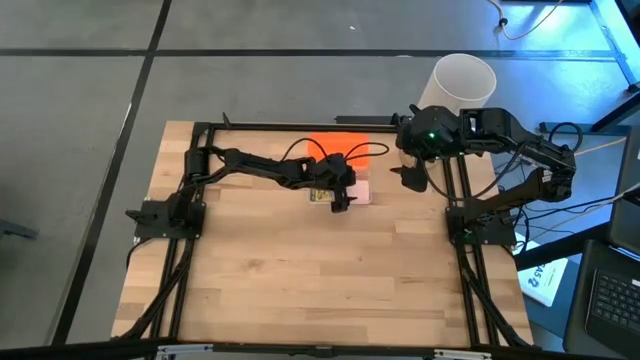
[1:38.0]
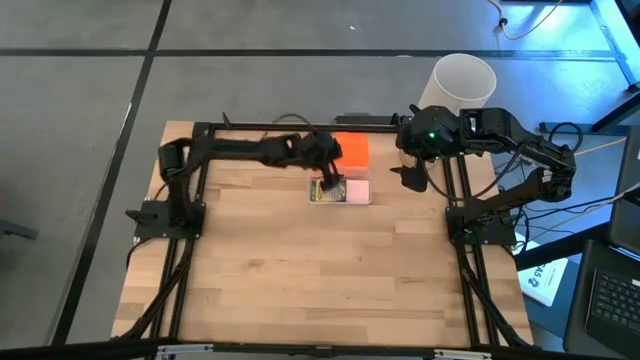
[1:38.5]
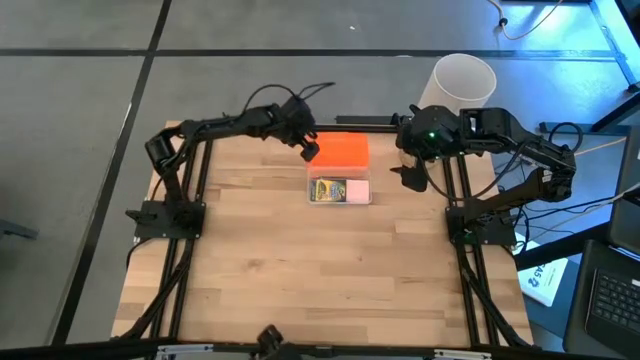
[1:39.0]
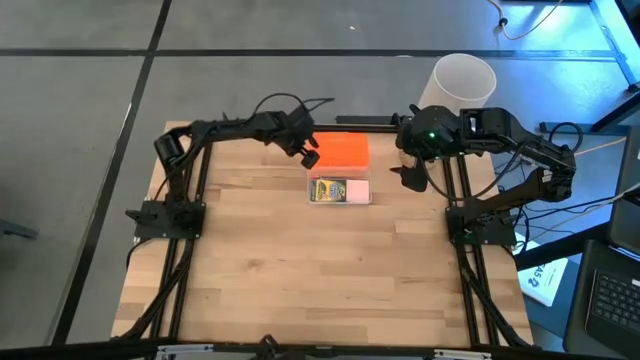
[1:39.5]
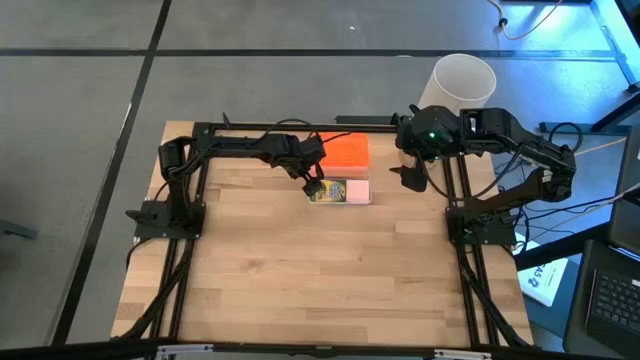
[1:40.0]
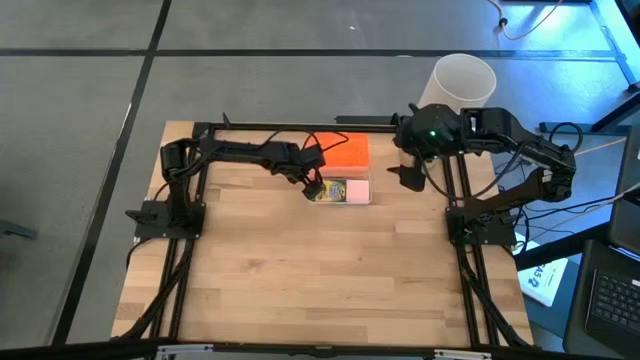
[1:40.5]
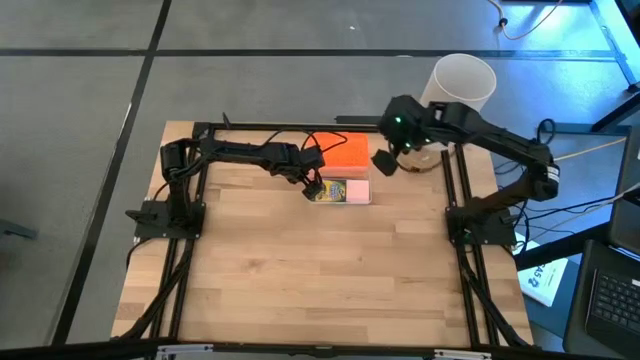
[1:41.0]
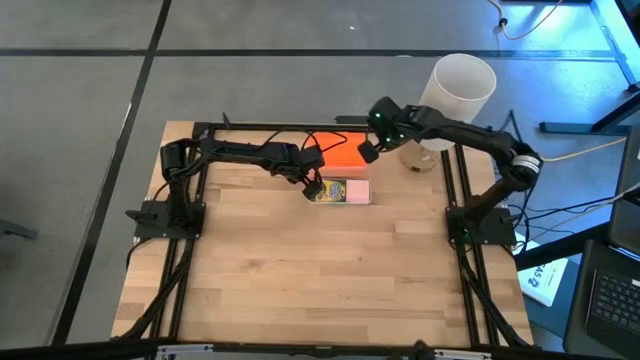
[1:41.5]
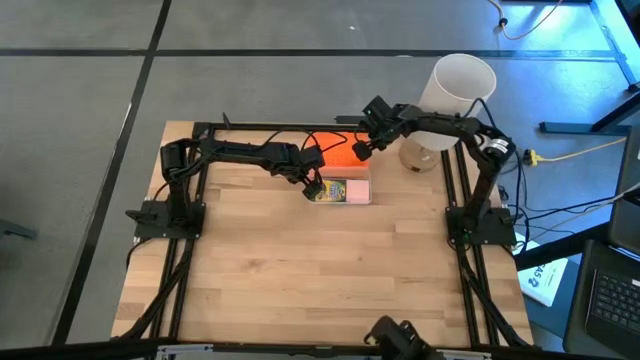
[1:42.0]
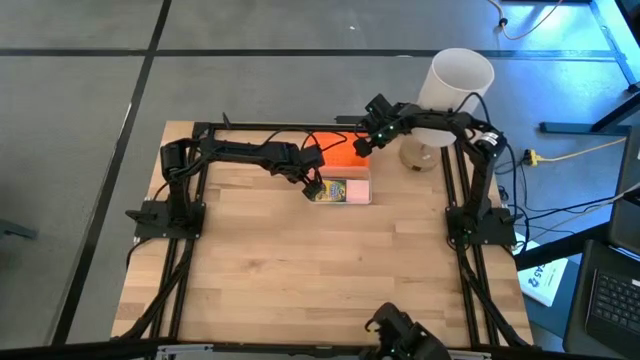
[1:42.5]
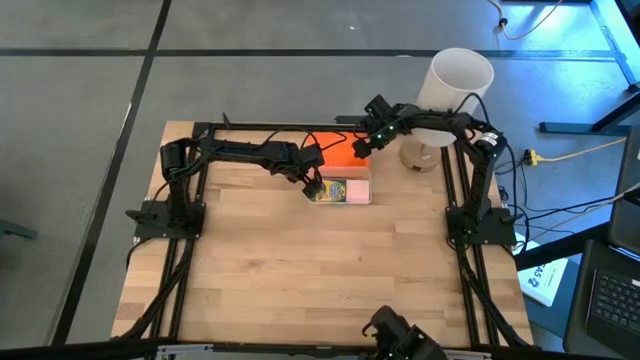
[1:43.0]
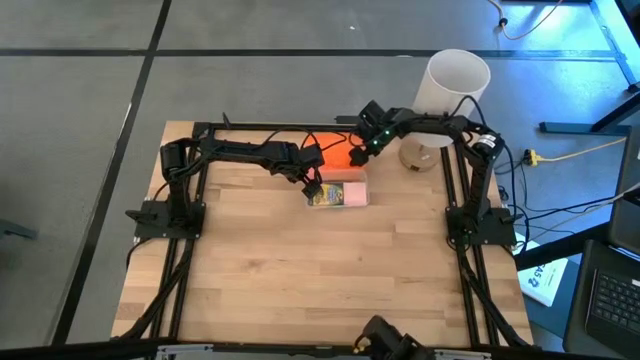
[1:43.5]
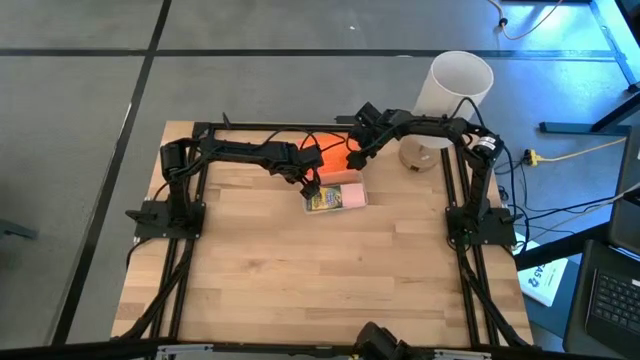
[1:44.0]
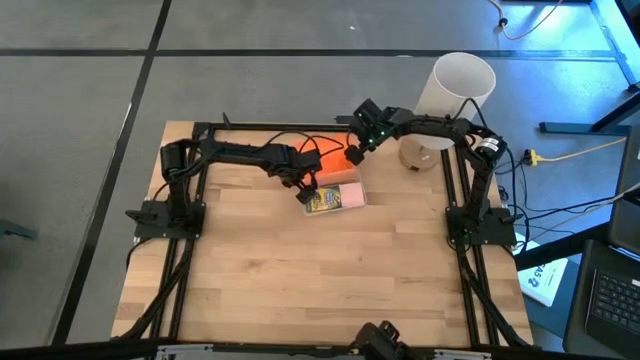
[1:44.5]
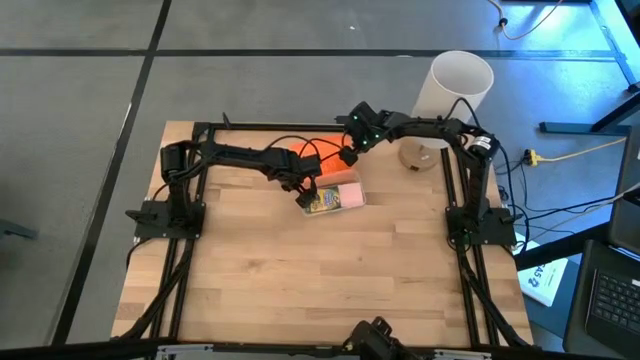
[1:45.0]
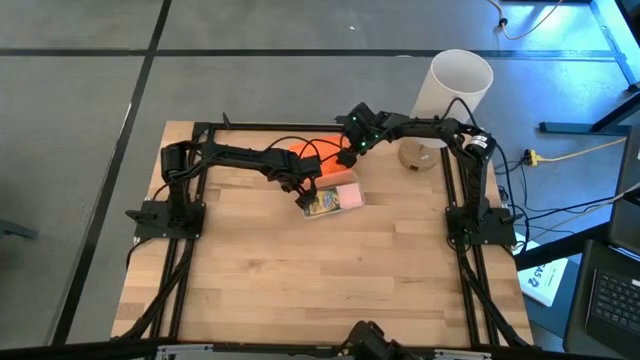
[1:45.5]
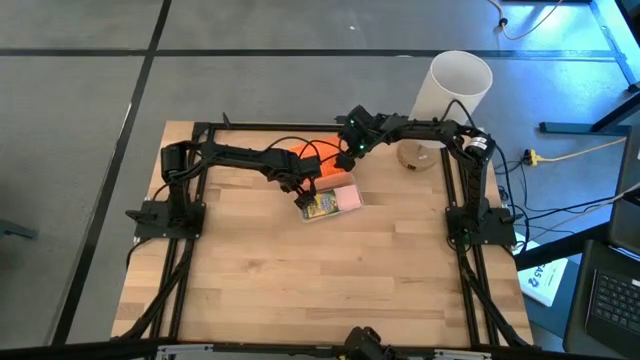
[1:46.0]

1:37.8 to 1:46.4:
Task: Pack school essentials
Close the orange supply box

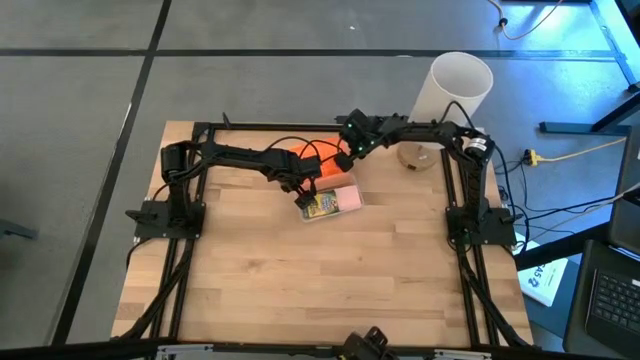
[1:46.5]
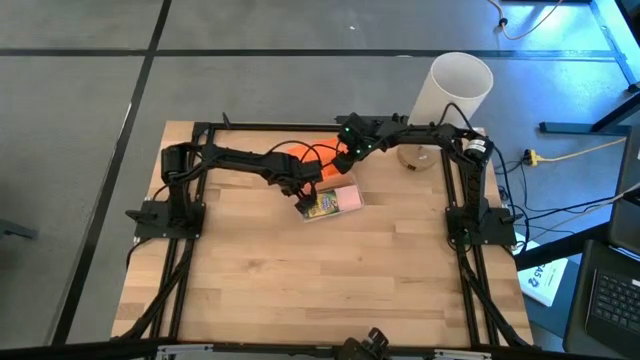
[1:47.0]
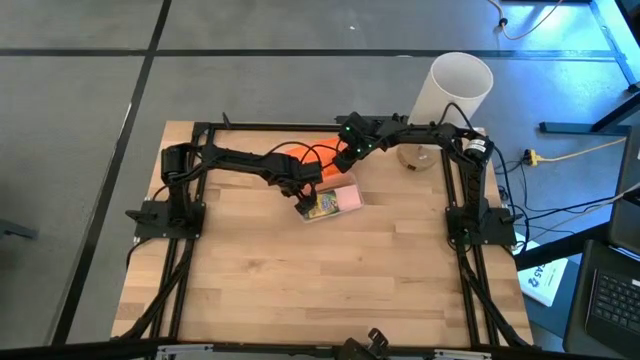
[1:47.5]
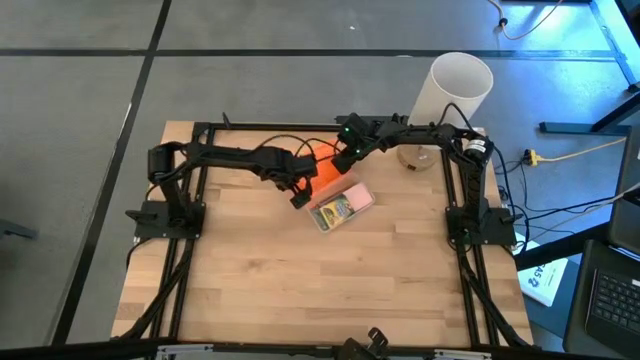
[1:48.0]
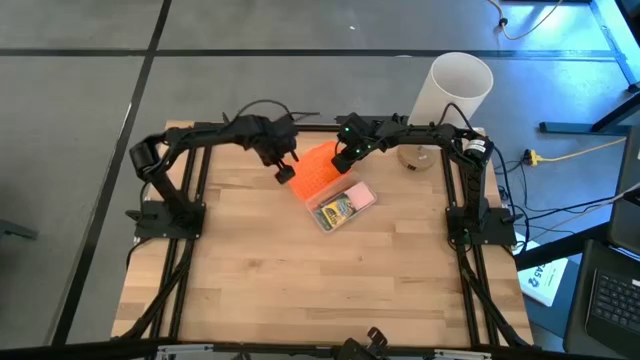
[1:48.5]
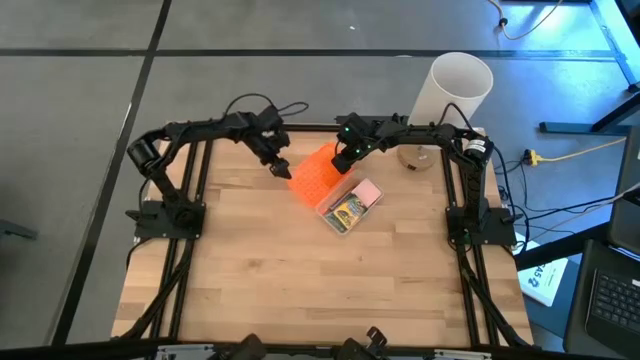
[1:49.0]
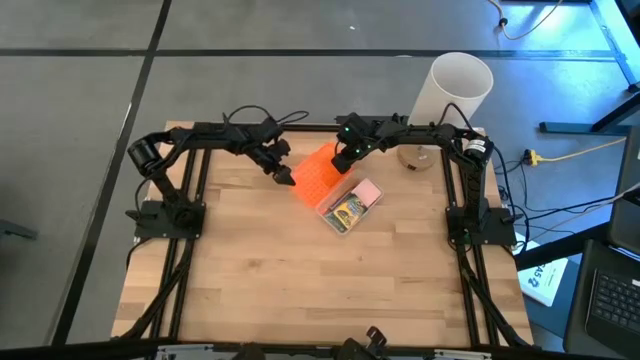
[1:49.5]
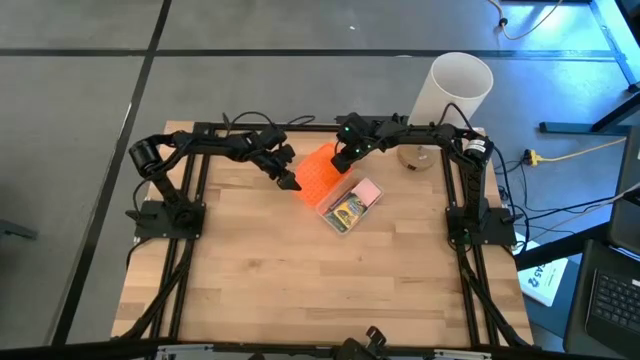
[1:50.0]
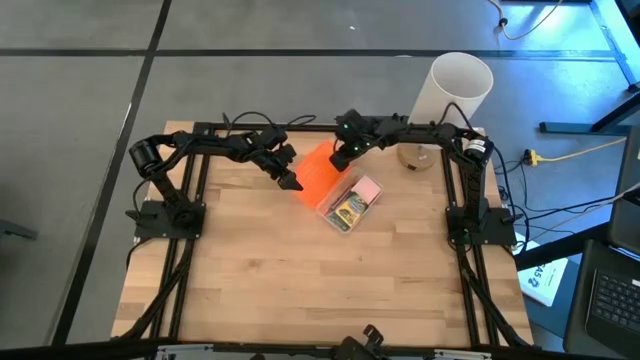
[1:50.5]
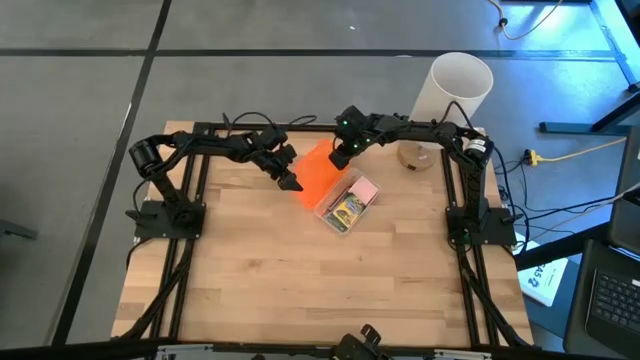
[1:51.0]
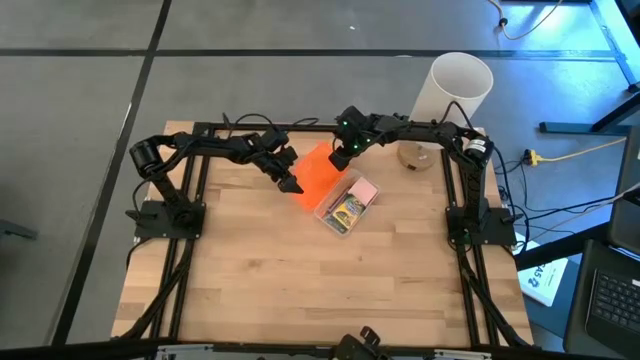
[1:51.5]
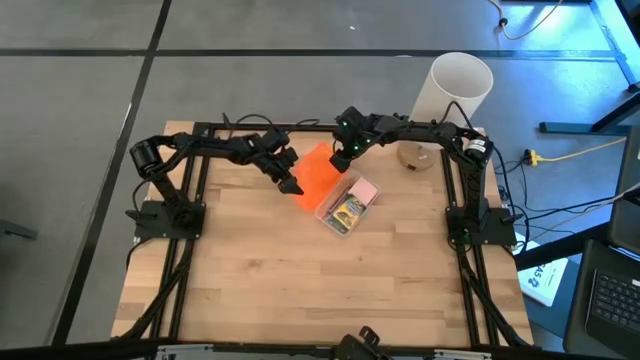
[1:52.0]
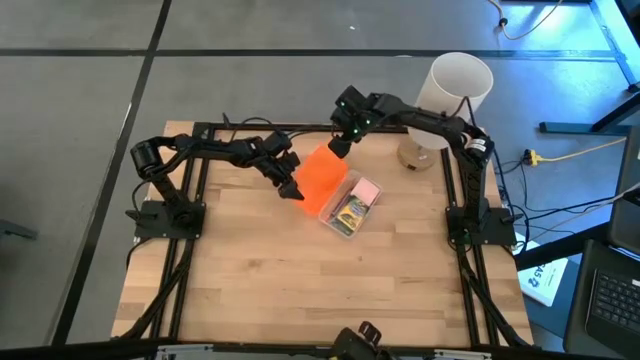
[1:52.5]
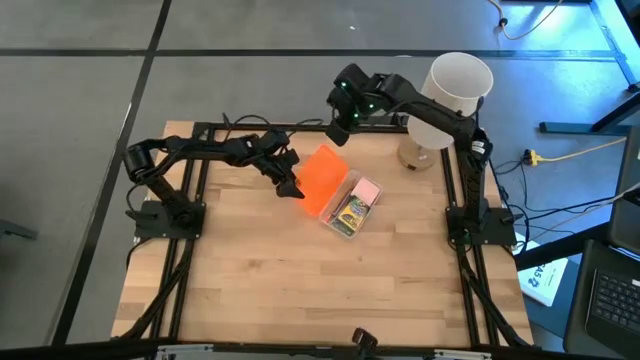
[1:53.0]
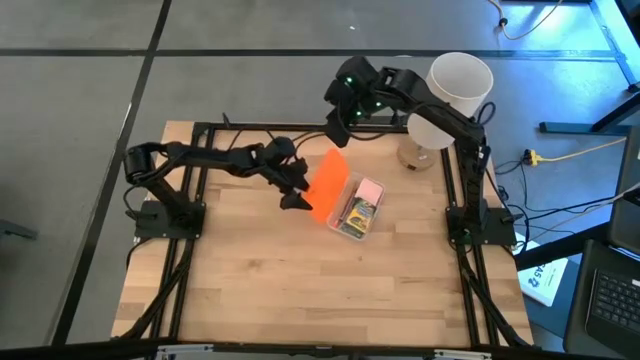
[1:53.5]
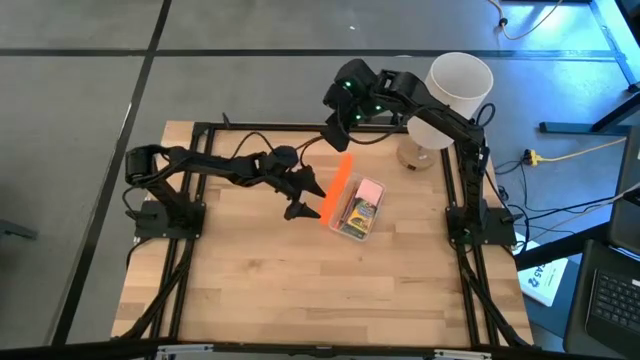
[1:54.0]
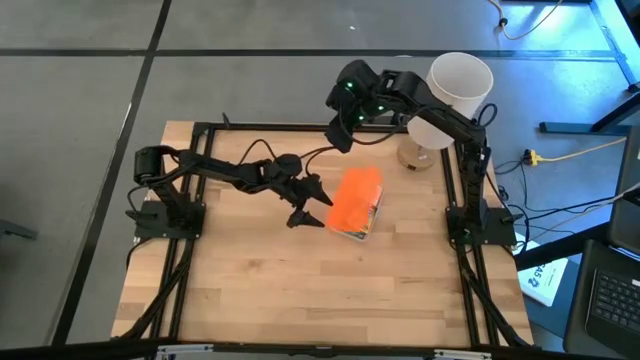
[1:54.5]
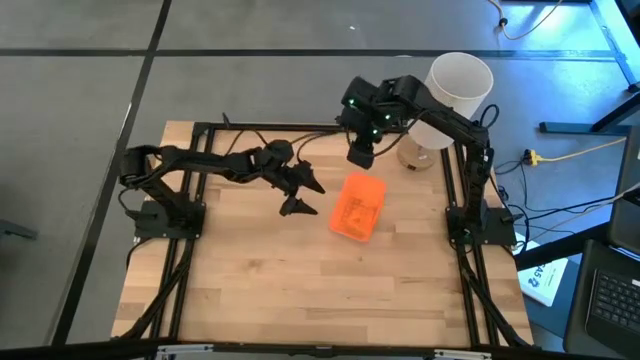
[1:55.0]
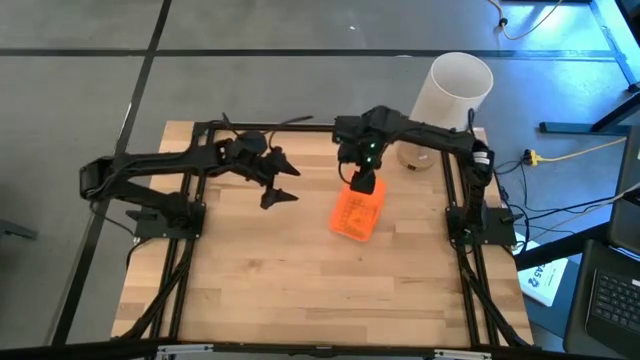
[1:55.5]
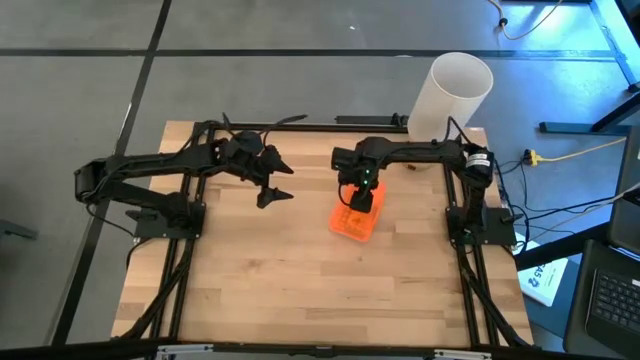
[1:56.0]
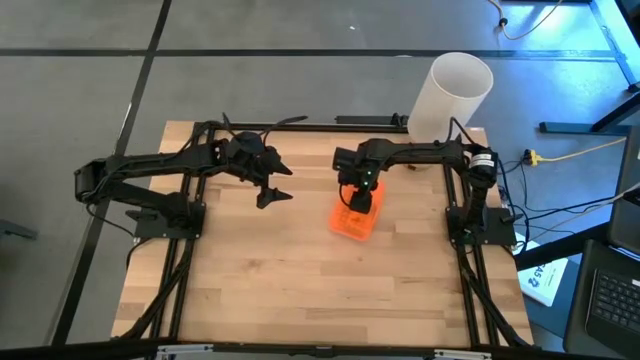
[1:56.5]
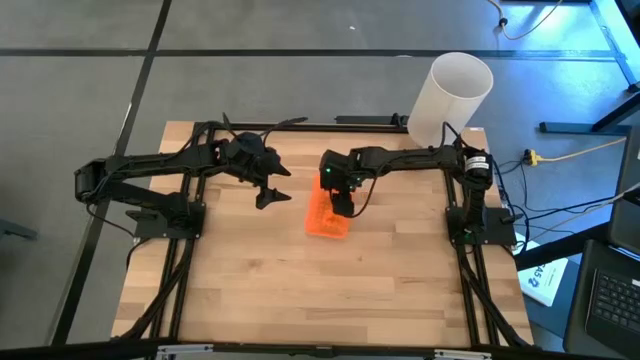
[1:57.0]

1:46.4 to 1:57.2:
Close the orange supply box

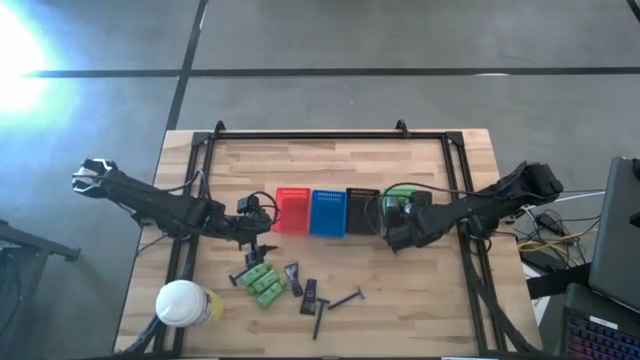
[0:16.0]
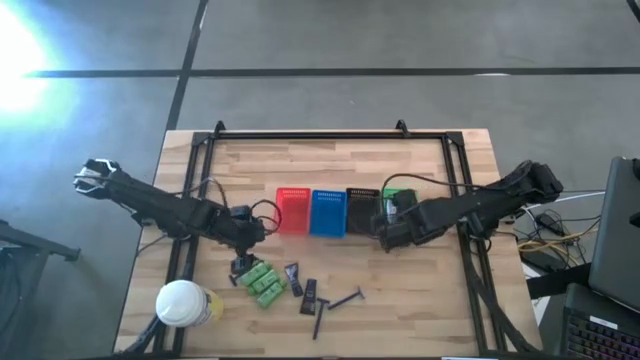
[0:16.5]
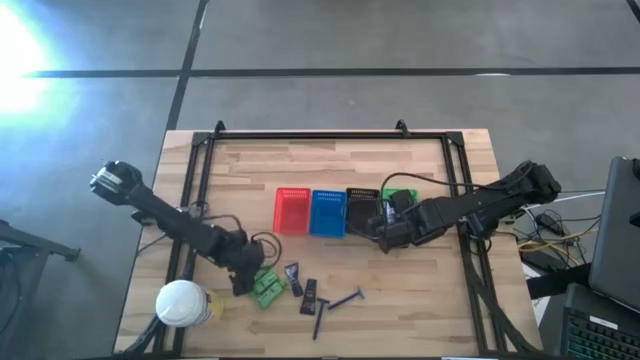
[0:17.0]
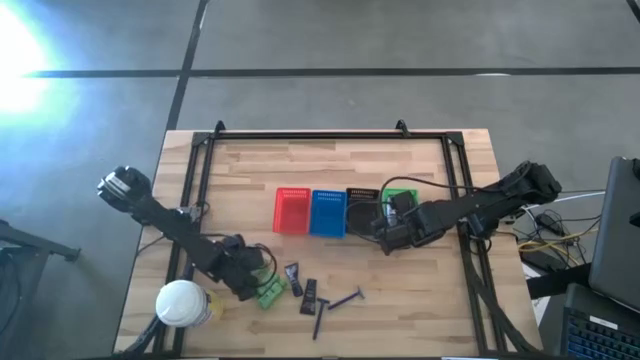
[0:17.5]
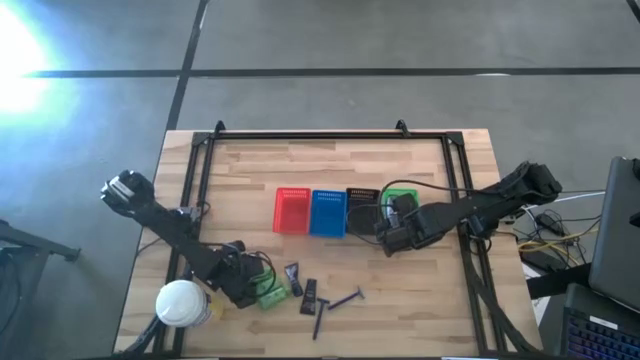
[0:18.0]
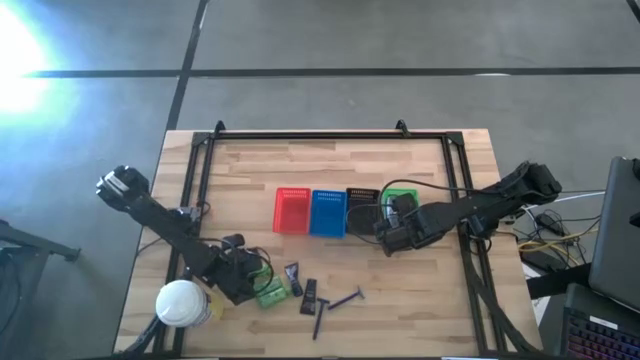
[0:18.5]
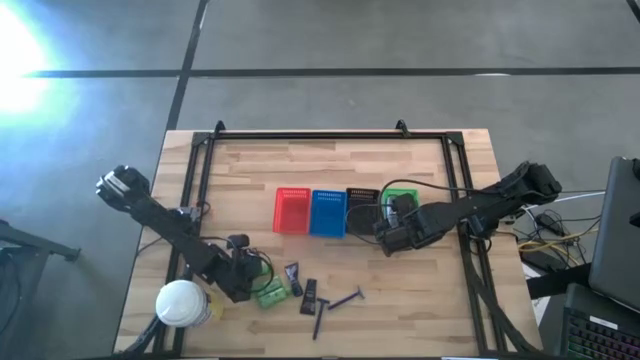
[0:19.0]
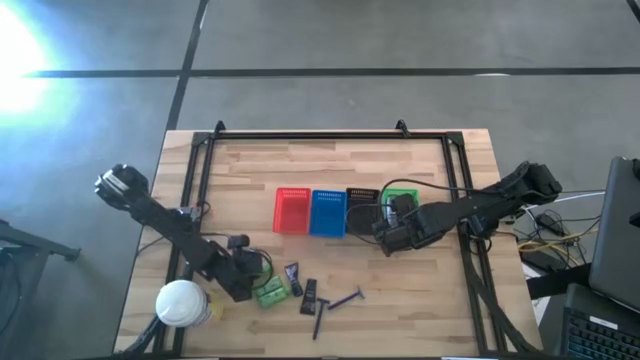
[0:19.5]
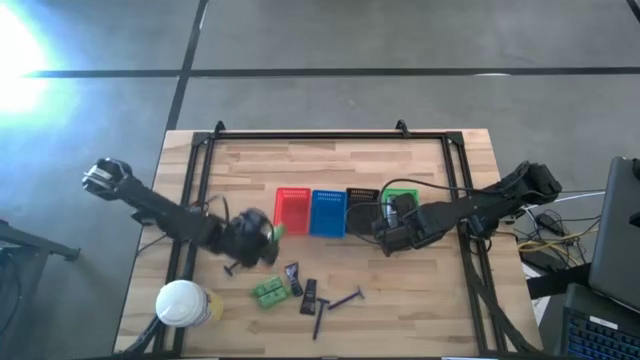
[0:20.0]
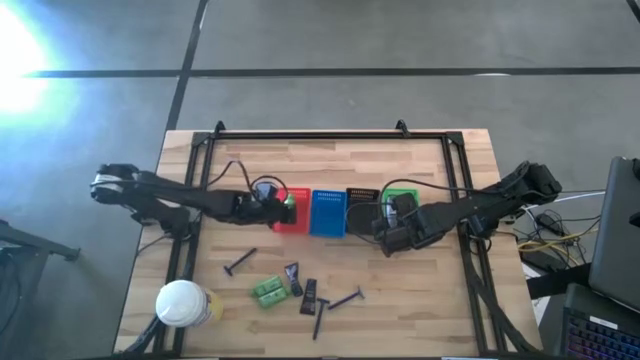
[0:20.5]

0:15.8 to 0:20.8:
Task: Pick & Place Travel size toiletries
Put the green shampoo into the red bin
